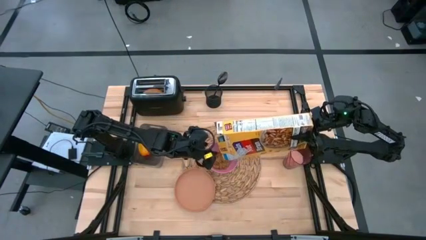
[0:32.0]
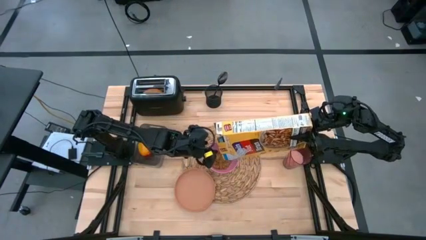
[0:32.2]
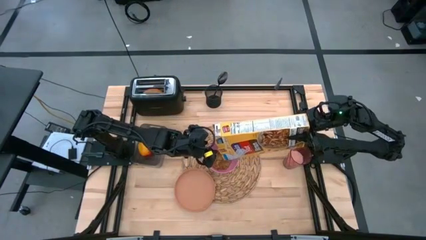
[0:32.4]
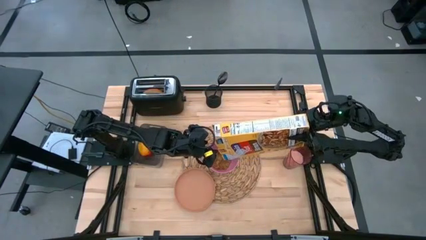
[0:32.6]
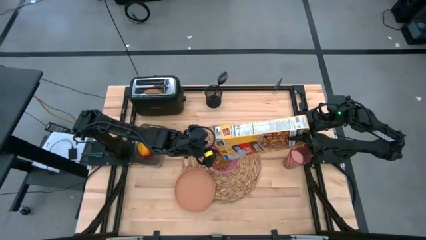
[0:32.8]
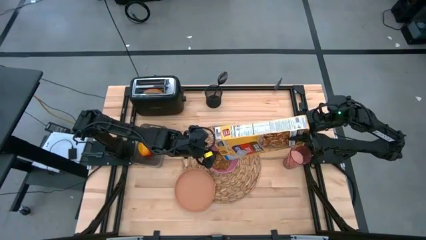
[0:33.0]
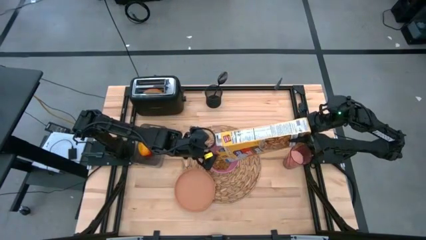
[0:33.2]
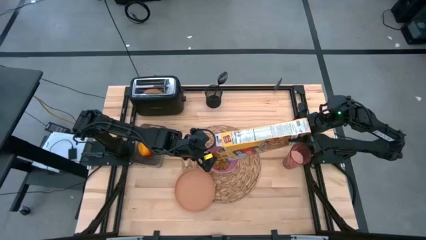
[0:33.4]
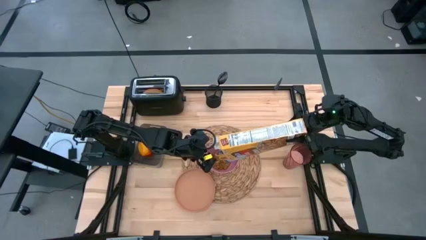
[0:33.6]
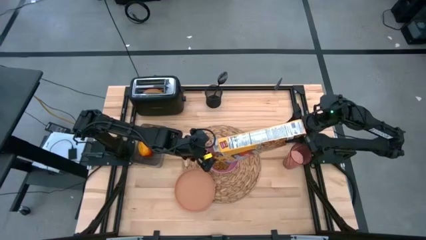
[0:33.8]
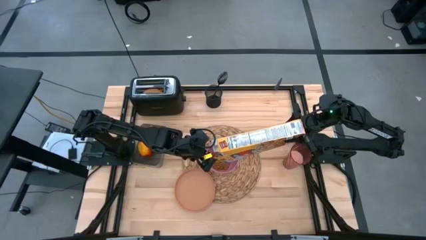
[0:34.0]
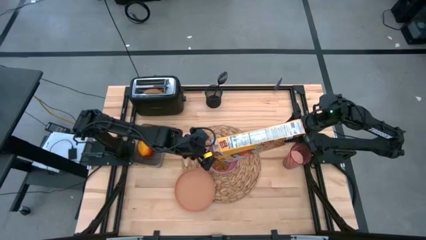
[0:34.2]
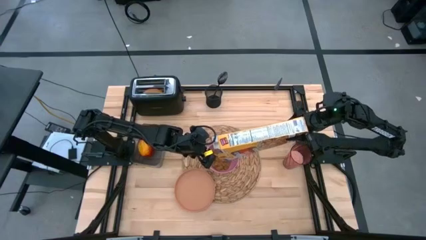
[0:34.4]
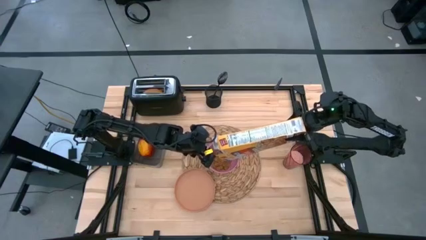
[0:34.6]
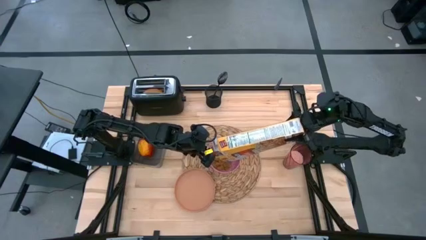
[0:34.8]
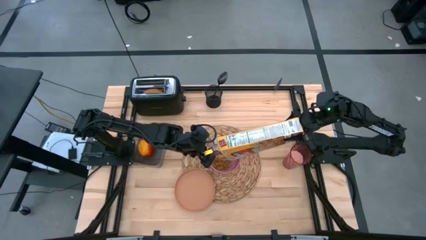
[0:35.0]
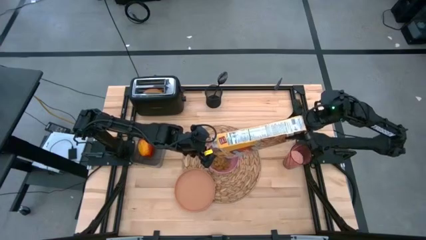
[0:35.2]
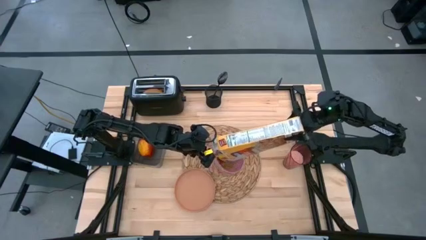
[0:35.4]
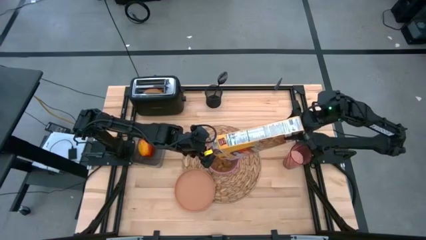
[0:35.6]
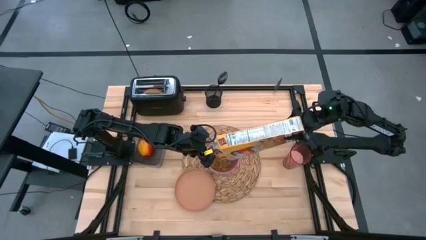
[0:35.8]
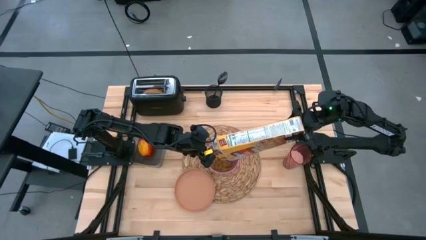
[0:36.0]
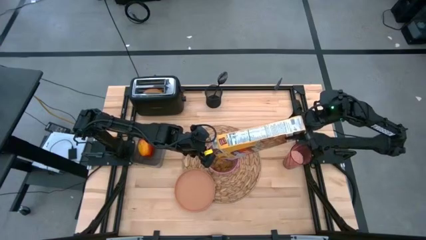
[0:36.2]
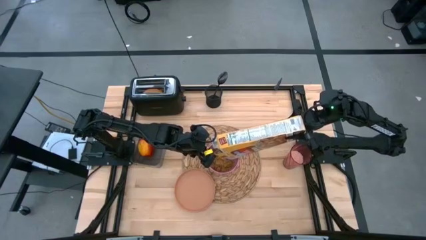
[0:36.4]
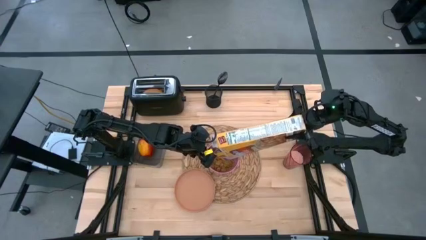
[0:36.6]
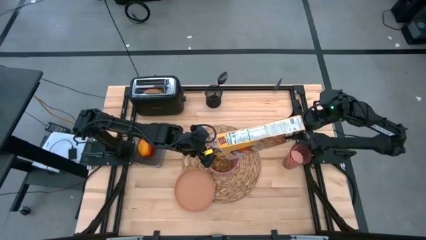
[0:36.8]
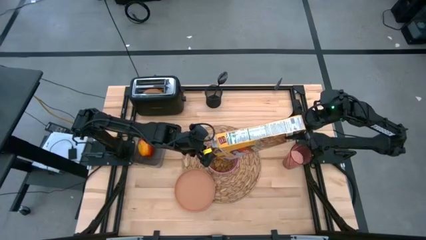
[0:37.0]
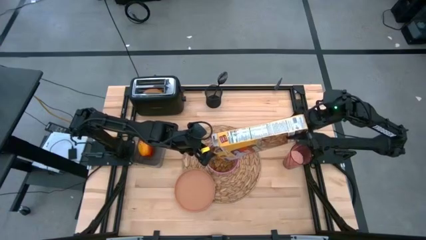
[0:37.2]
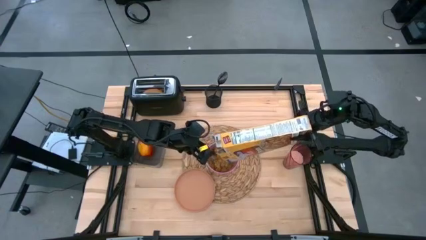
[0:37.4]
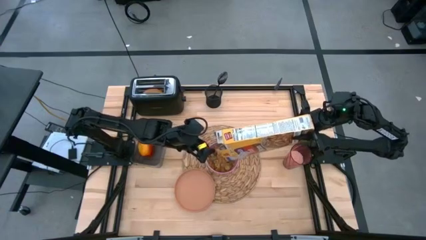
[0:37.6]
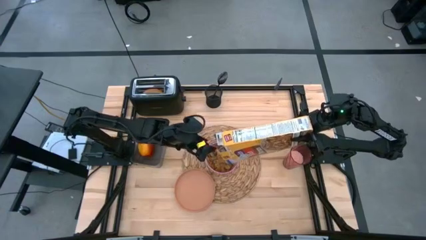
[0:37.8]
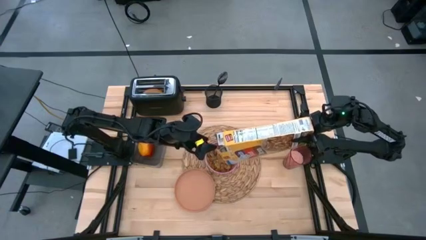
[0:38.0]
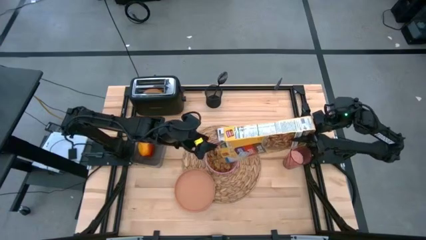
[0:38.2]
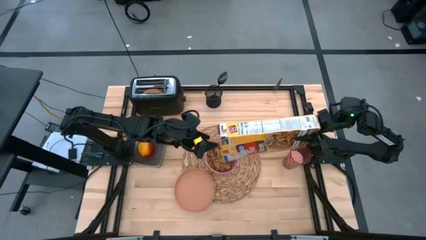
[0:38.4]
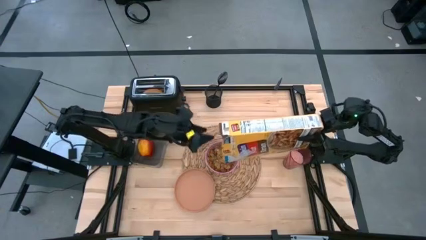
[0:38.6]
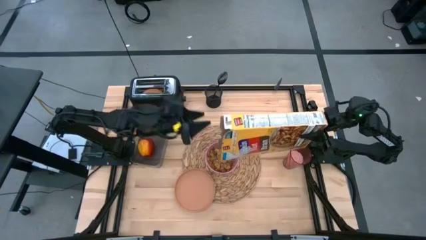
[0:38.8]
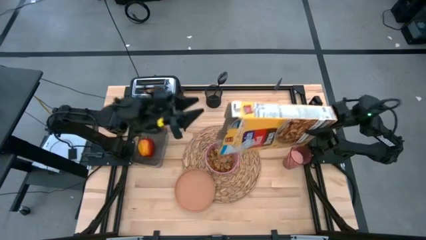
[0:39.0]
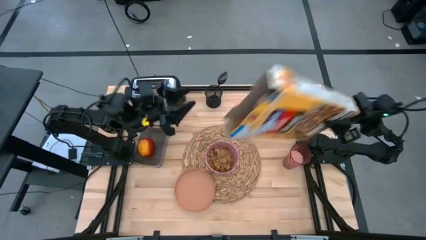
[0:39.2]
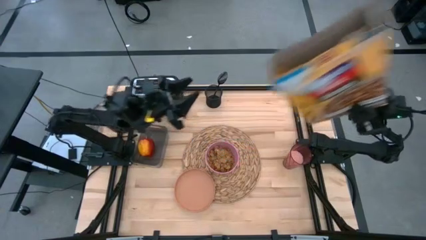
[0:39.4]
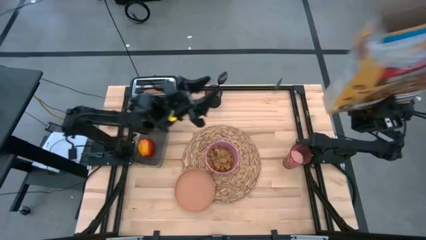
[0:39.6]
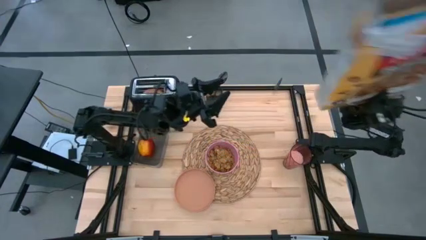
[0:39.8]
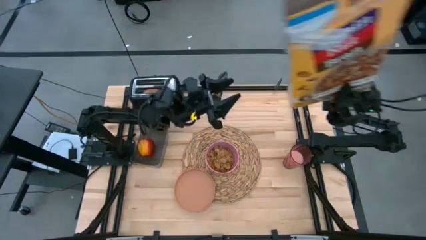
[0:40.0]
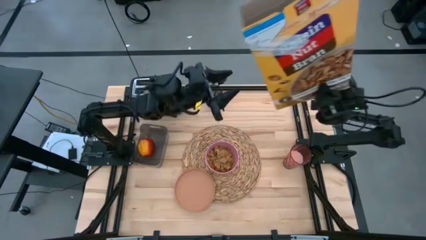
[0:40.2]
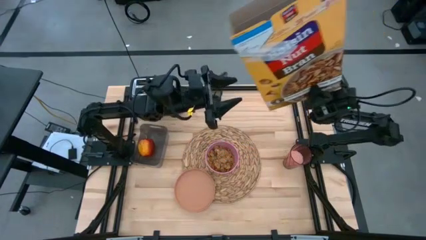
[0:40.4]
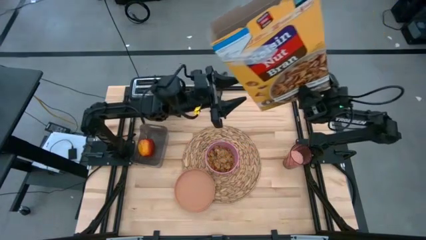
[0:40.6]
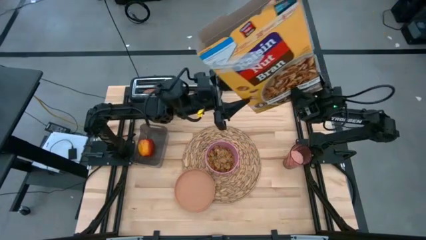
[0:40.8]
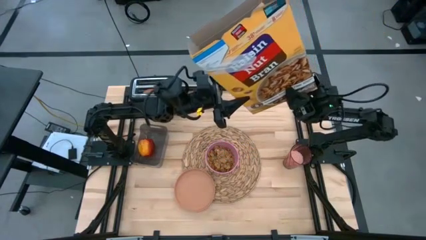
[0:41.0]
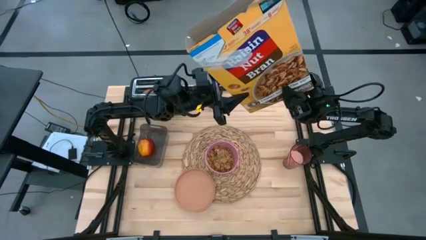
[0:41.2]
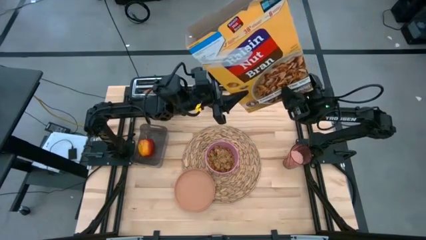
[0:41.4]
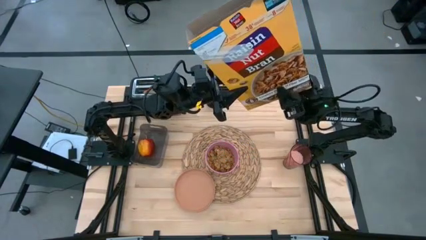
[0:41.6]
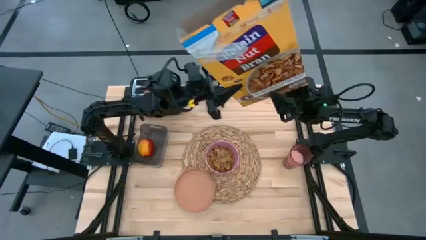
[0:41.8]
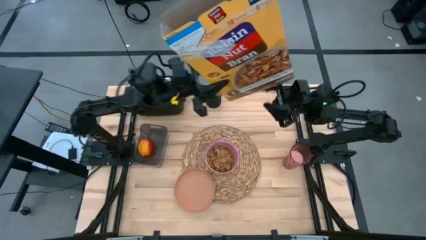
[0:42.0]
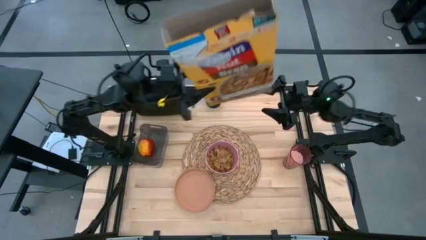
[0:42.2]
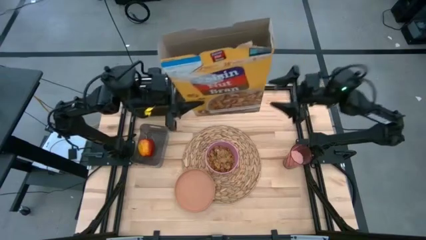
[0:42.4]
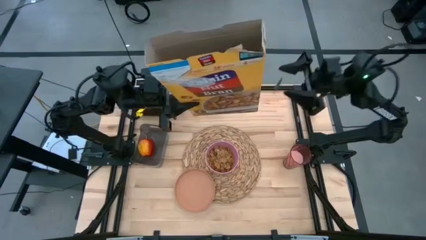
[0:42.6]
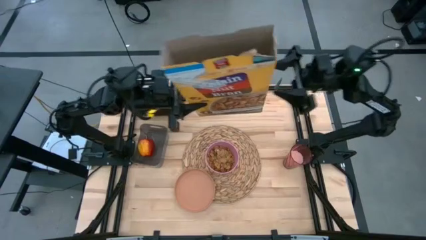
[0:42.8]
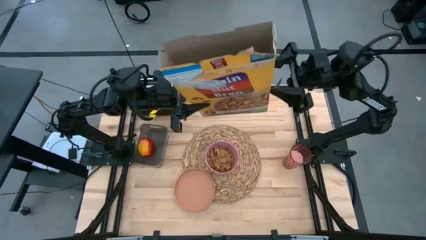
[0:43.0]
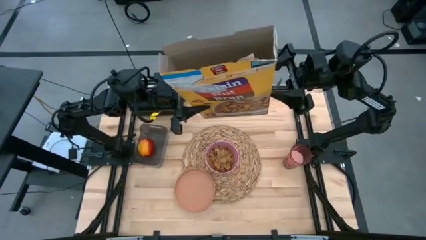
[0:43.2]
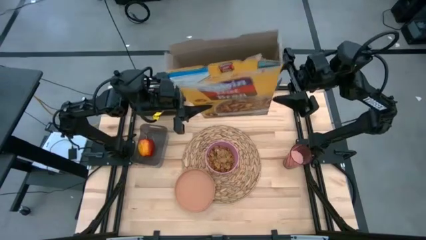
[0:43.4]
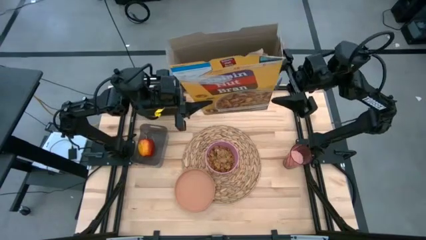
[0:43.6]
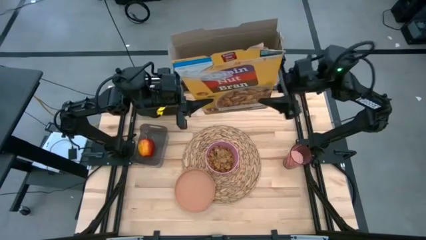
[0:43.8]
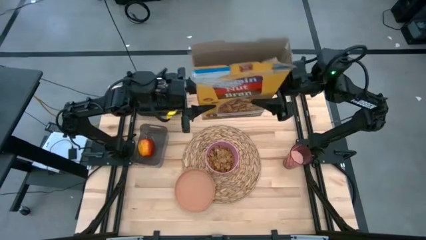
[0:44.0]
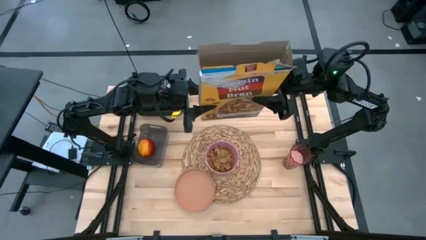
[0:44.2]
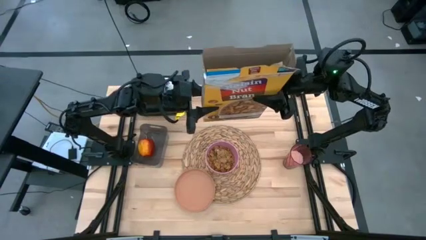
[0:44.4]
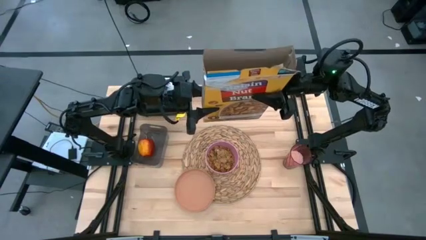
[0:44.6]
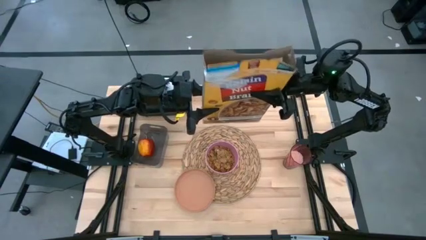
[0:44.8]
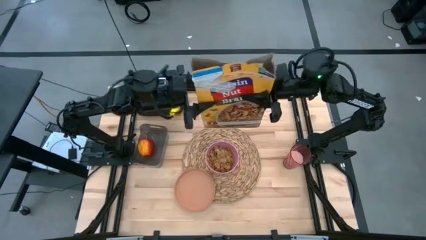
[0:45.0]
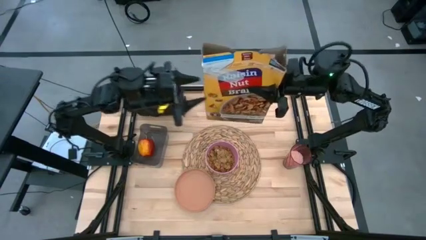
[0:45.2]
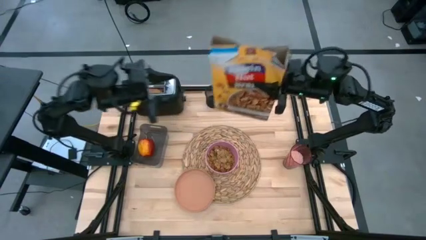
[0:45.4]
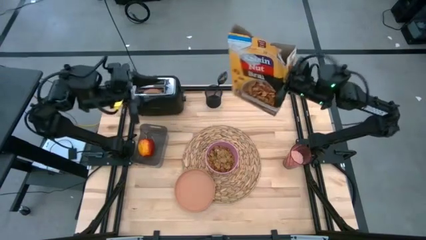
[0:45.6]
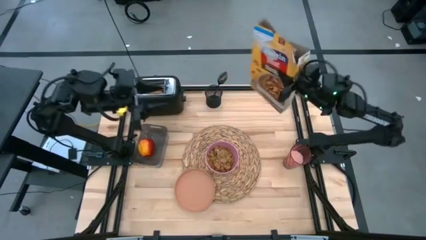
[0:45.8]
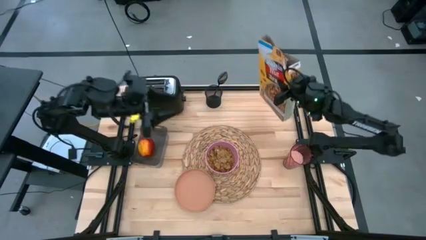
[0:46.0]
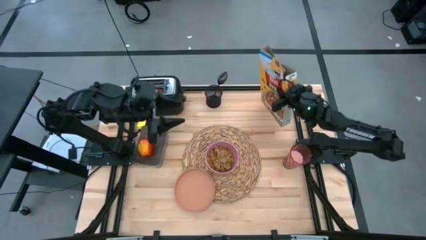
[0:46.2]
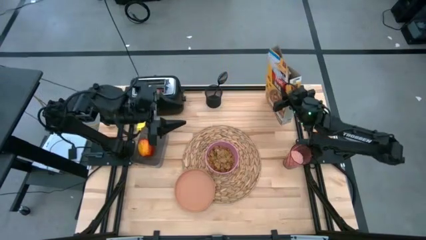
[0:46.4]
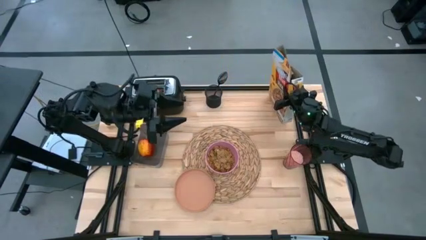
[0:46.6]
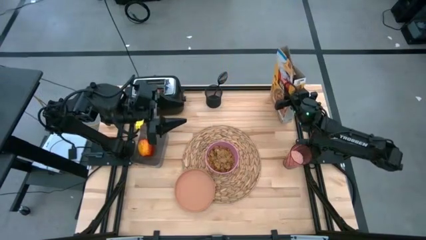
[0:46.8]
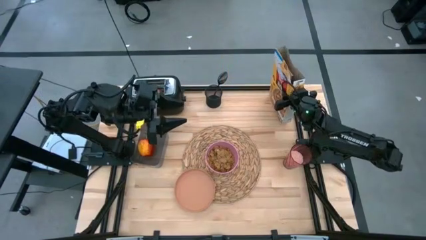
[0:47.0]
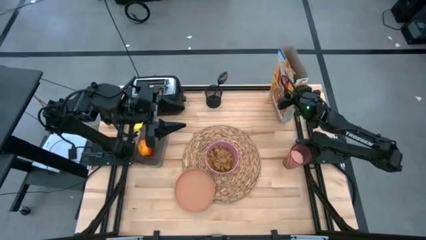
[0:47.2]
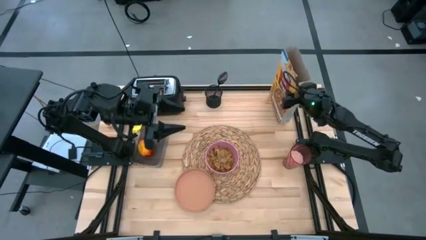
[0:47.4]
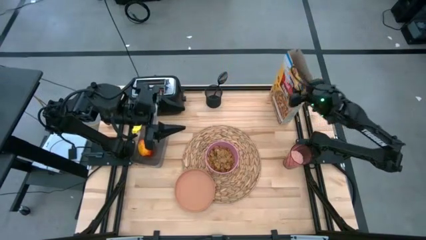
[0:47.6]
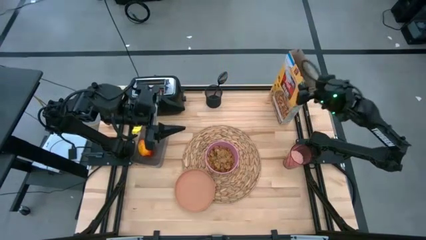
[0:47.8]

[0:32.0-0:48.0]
Task: Arrange a breakfast setting
Pour the cereal from the yellow cereal box into the pink bowl
